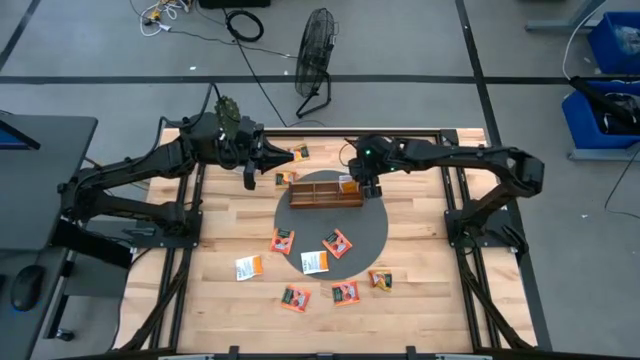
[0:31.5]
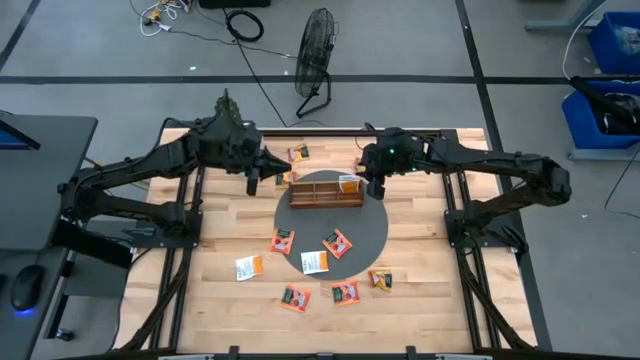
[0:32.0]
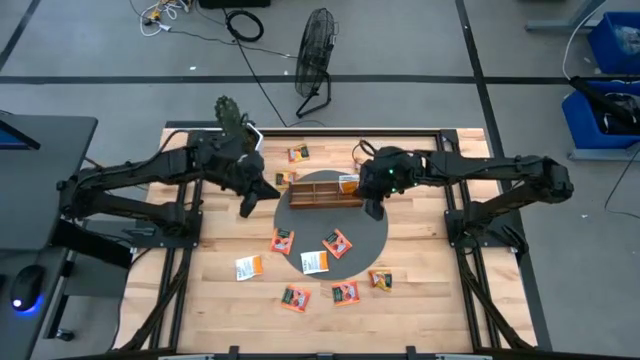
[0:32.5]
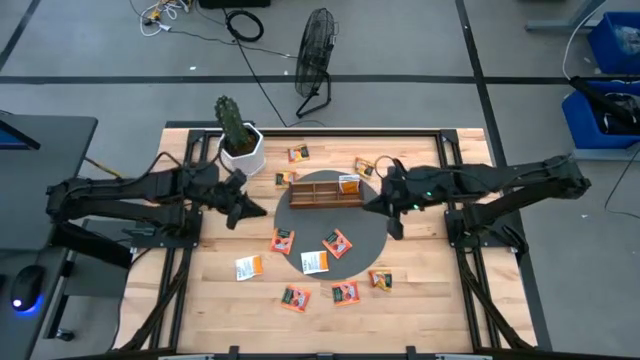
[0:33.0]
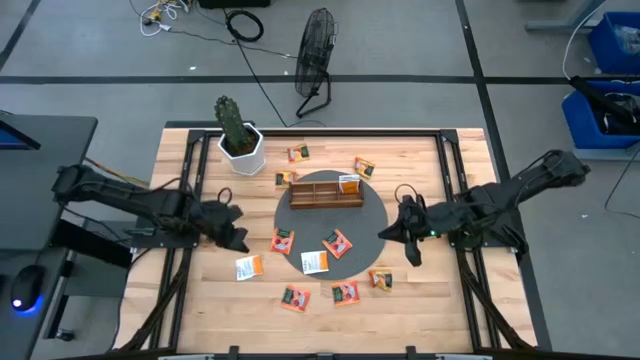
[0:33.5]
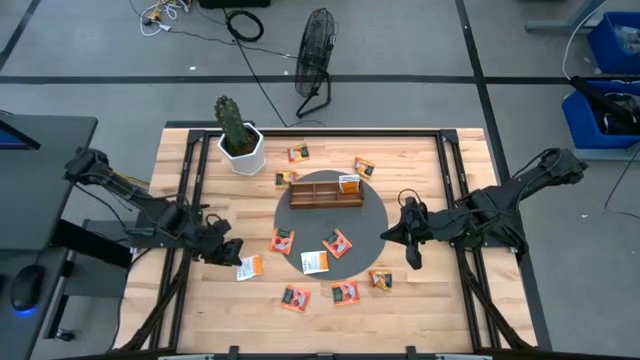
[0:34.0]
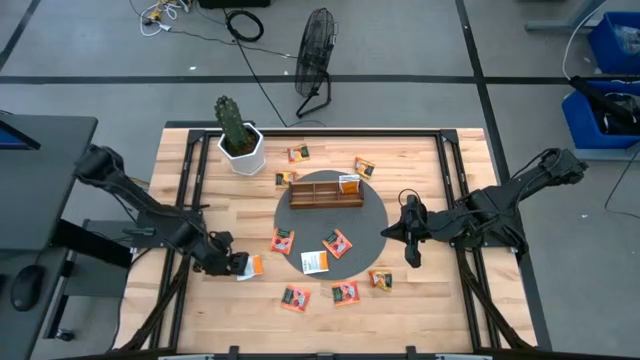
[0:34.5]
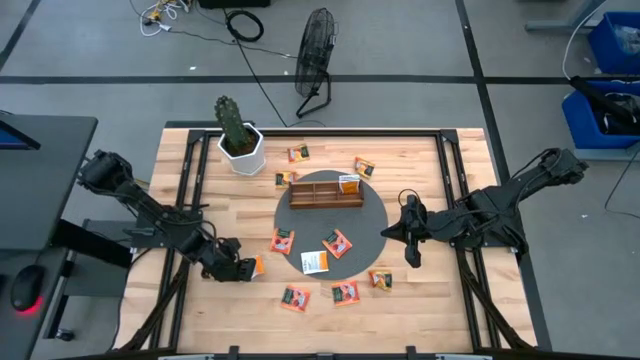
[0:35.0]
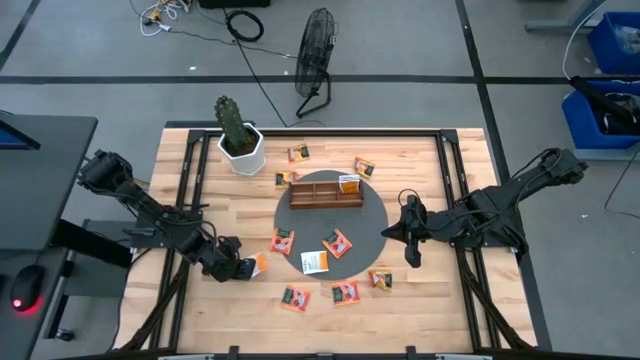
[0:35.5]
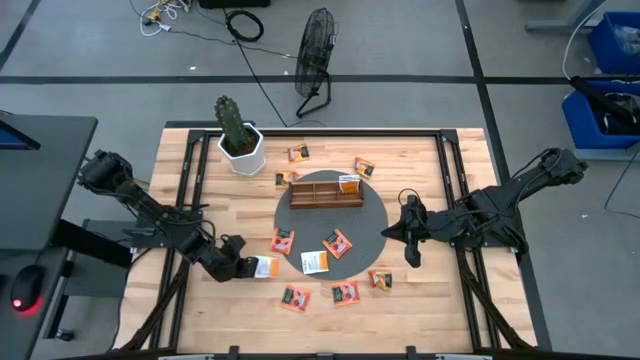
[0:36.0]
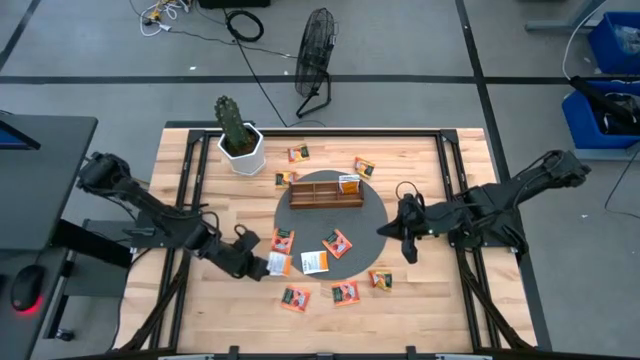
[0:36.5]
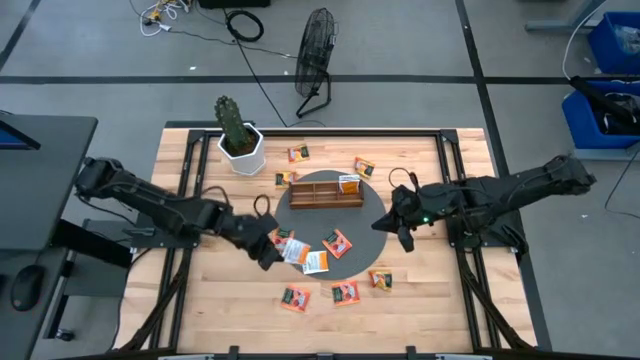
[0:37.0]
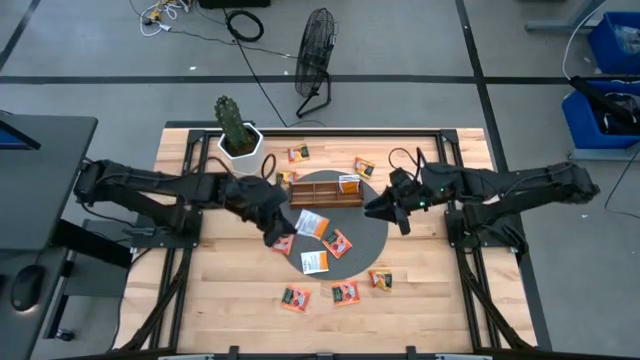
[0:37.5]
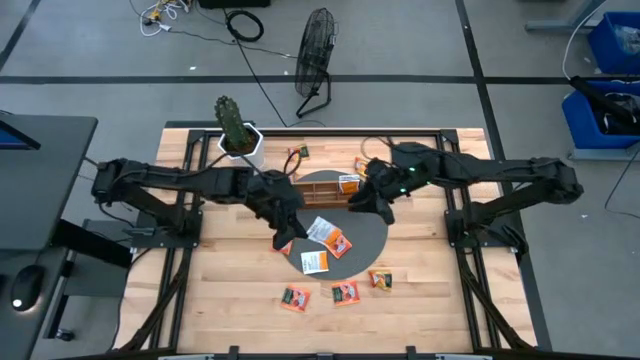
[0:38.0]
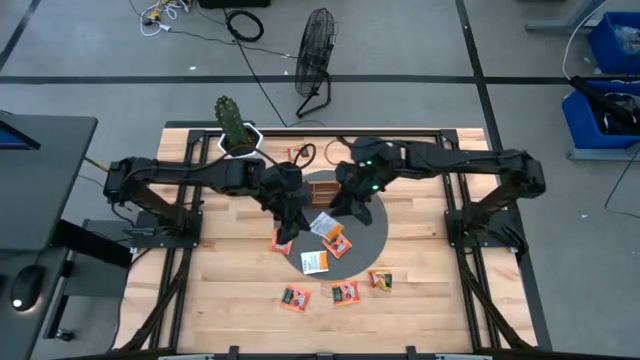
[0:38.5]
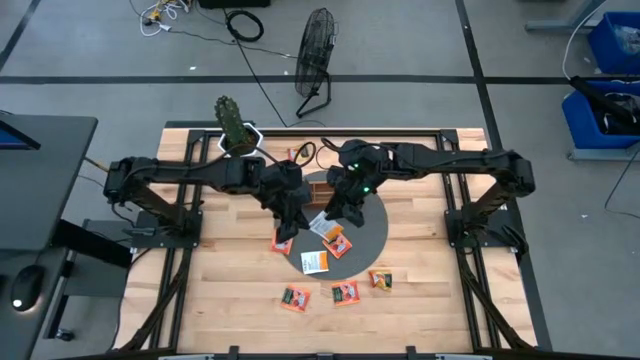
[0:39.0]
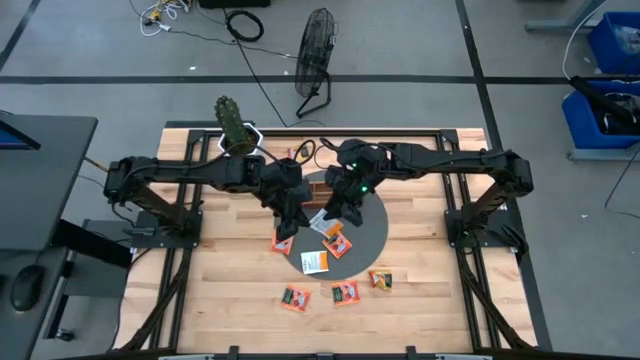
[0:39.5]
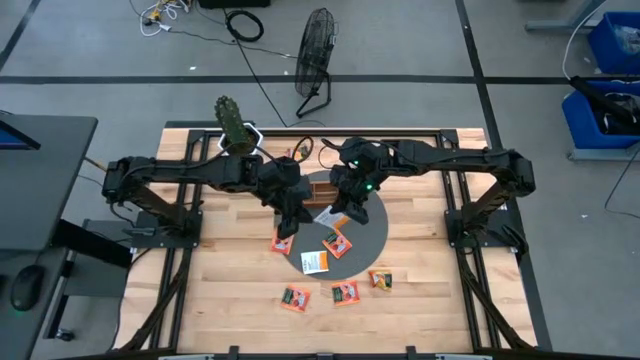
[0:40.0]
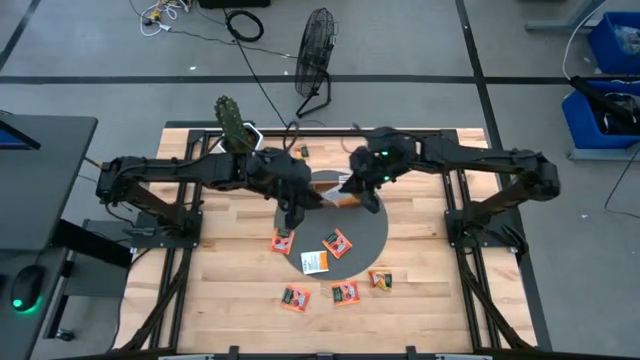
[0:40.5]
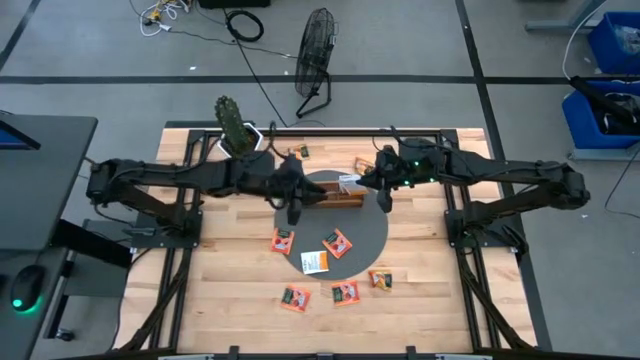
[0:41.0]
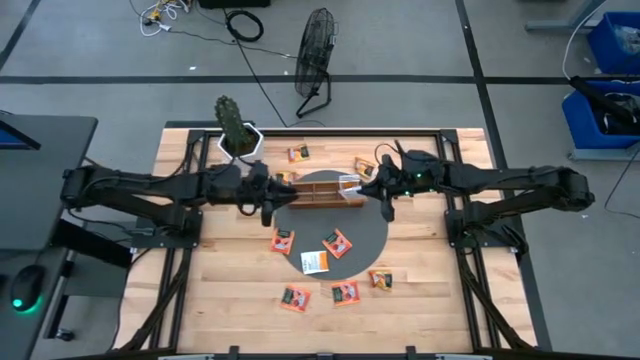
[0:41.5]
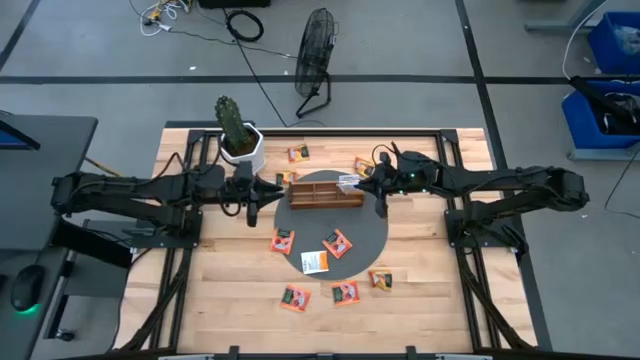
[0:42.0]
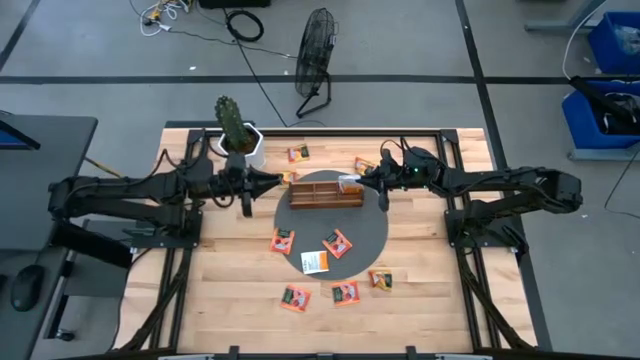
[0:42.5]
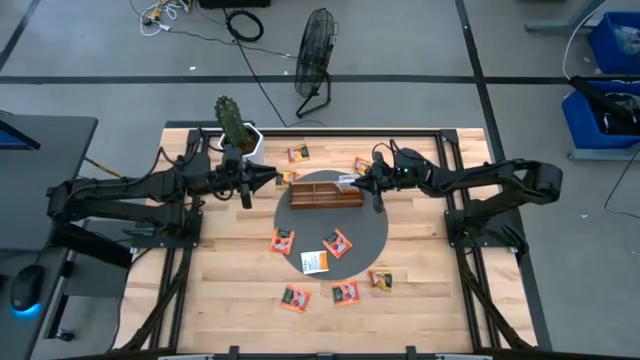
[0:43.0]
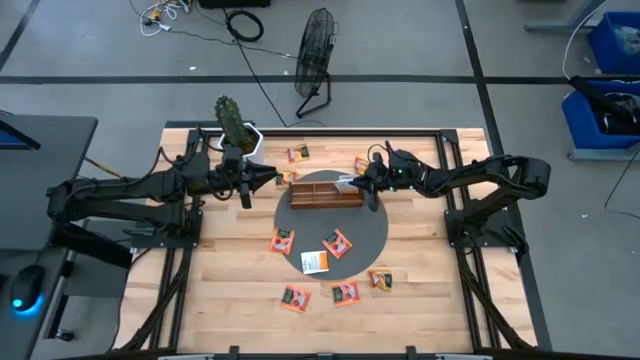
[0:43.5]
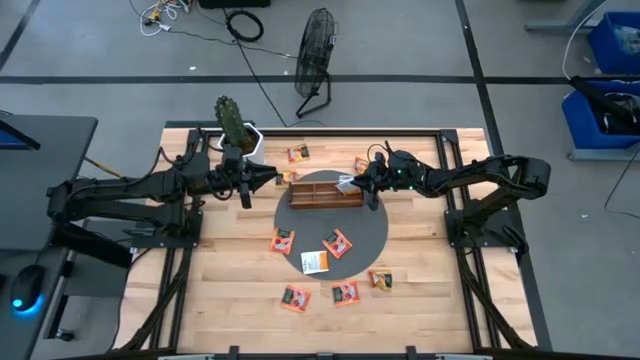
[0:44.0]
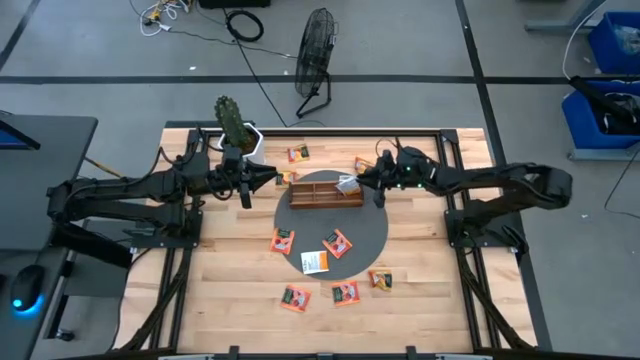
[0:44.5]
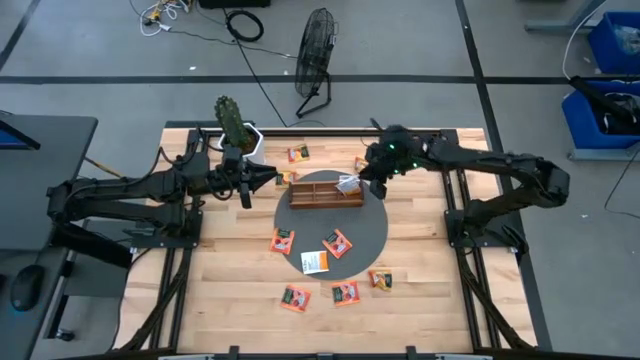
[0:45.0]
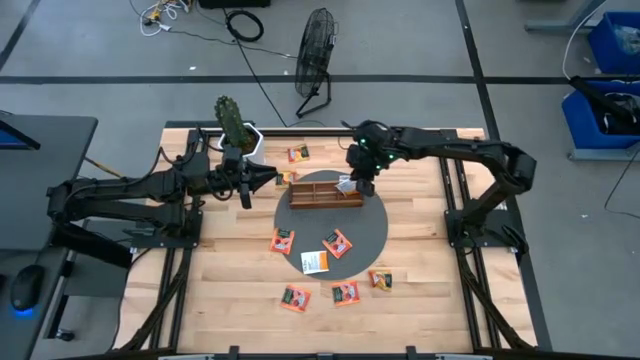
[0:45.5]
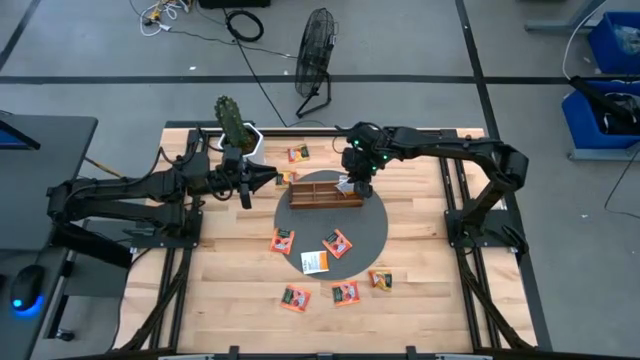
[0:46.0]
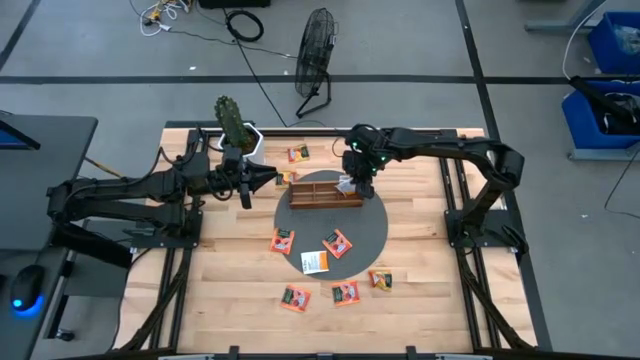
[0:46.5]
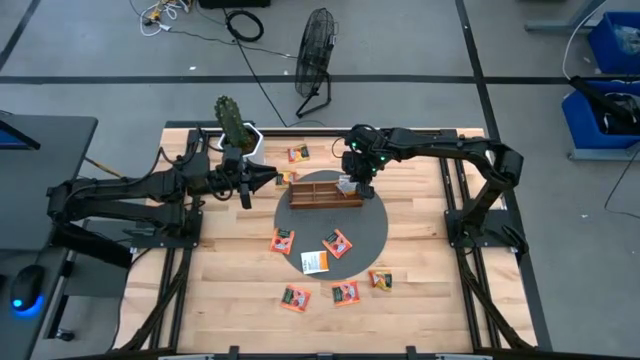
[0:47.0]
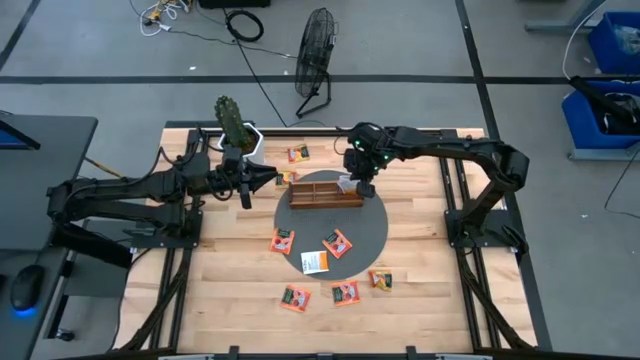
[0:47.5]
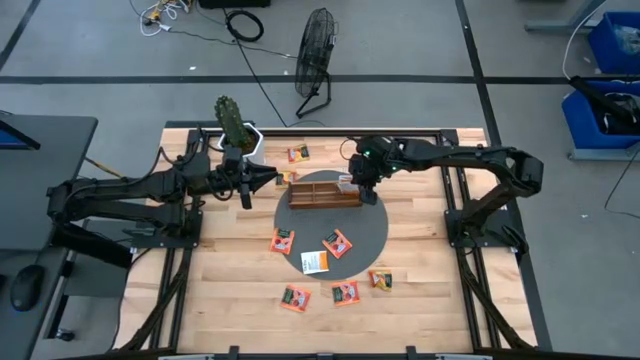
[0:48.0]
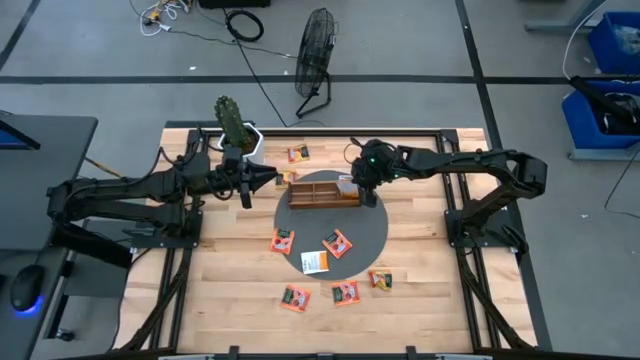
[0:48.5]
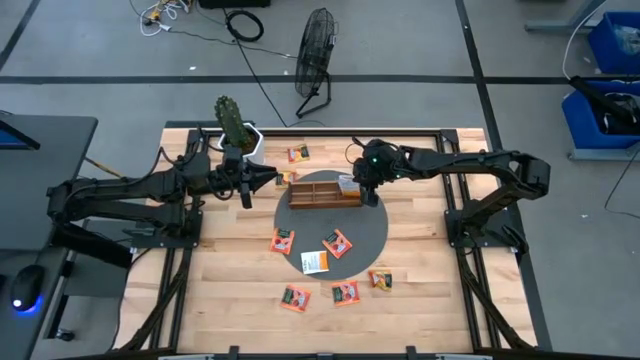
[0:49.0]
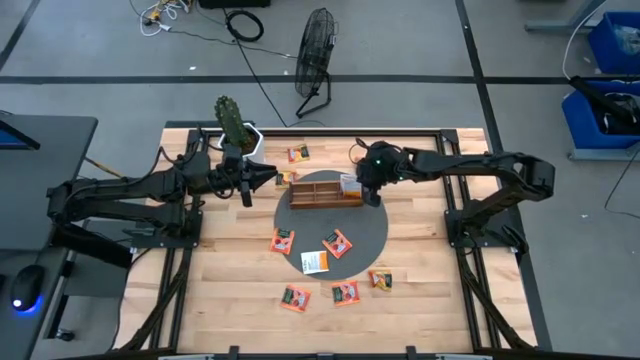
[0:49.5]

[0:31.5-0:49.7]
Task: Pick & Place Tea
Put the white tea bag into the right section of the wooden organizer
